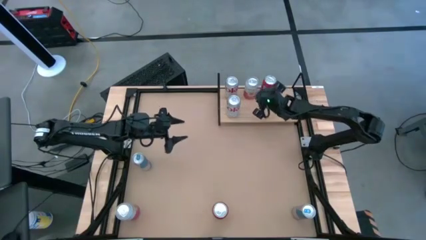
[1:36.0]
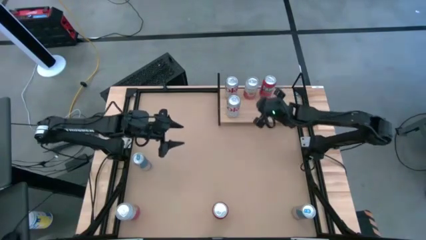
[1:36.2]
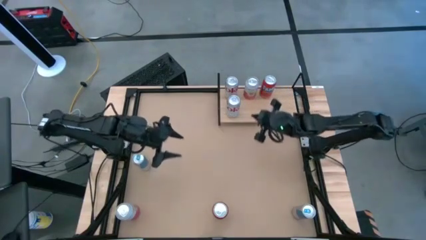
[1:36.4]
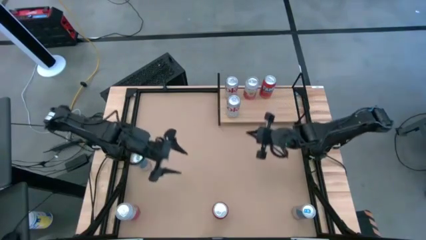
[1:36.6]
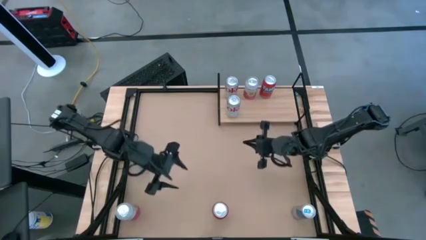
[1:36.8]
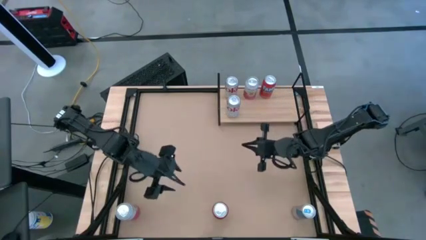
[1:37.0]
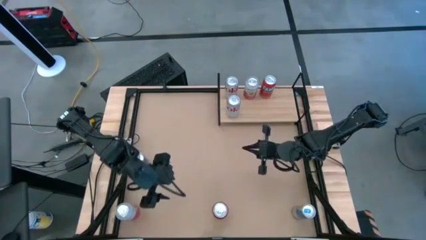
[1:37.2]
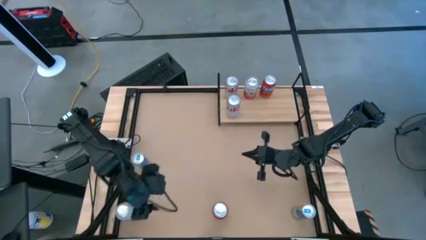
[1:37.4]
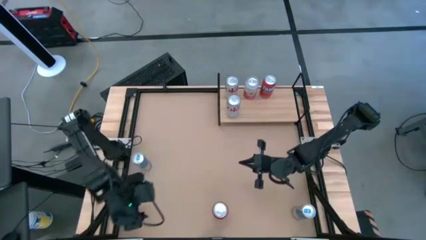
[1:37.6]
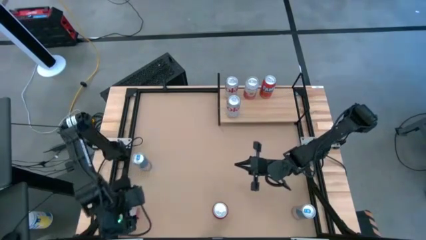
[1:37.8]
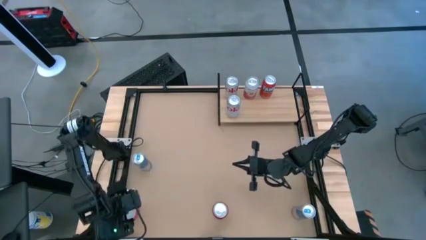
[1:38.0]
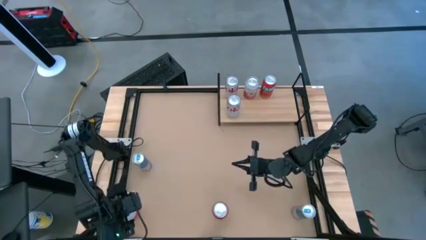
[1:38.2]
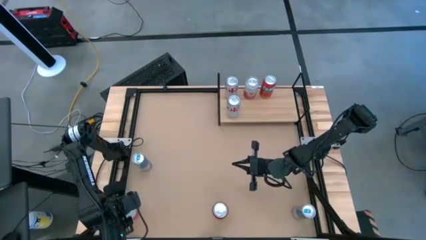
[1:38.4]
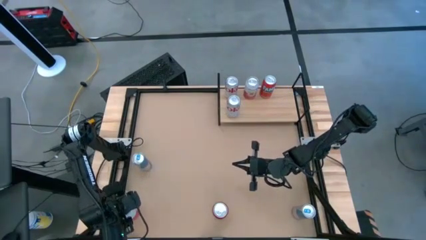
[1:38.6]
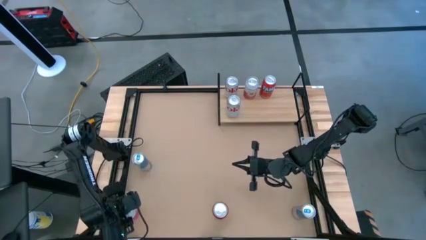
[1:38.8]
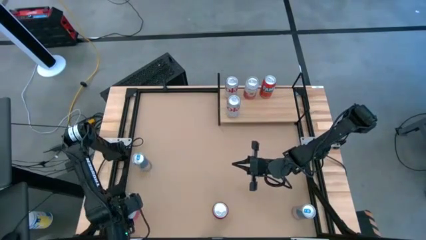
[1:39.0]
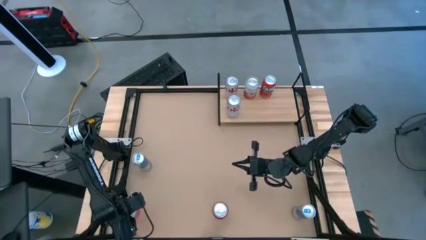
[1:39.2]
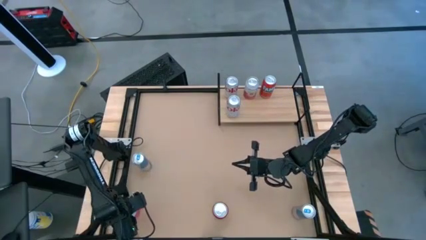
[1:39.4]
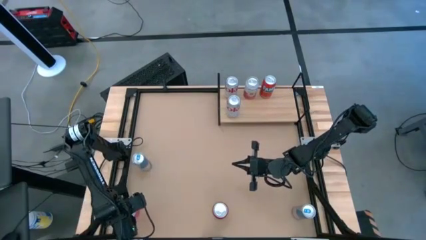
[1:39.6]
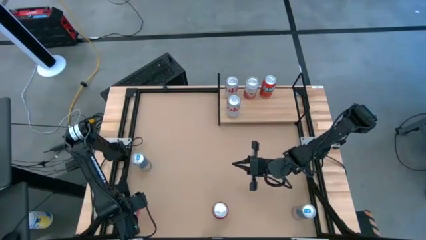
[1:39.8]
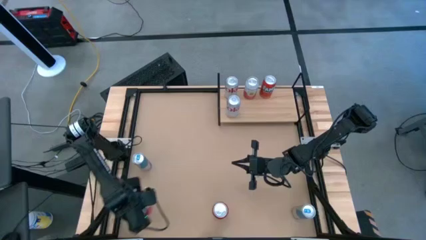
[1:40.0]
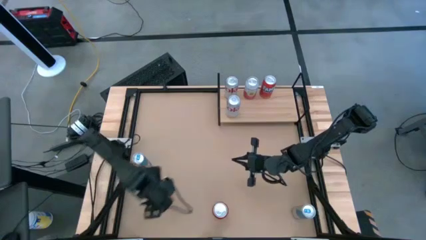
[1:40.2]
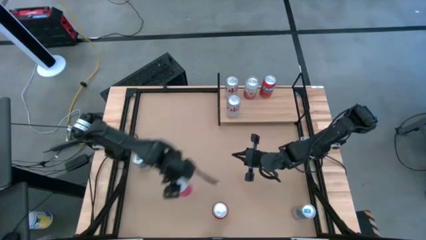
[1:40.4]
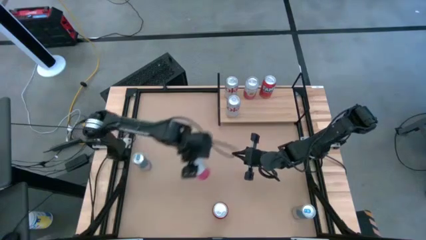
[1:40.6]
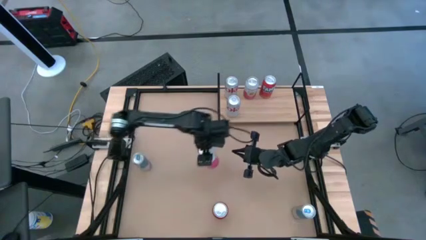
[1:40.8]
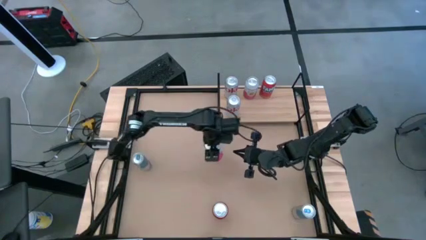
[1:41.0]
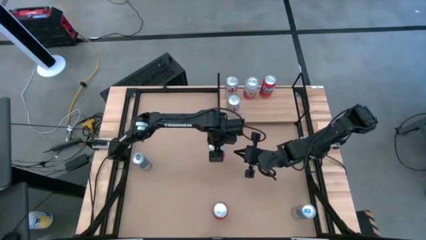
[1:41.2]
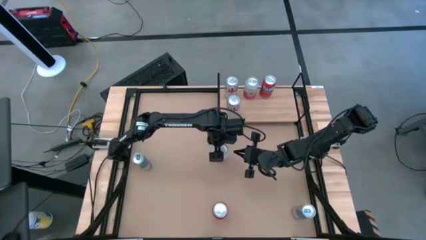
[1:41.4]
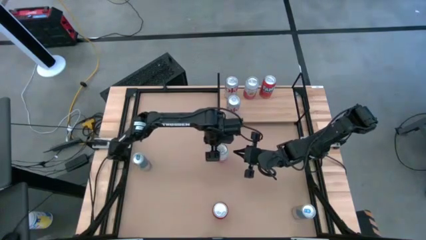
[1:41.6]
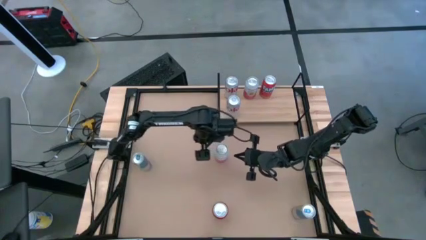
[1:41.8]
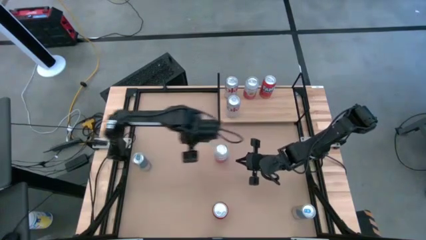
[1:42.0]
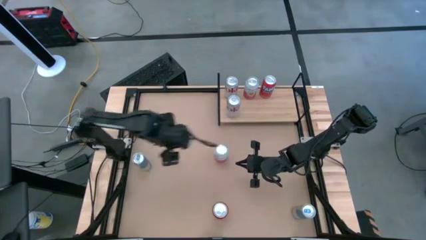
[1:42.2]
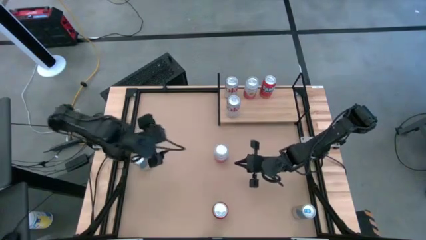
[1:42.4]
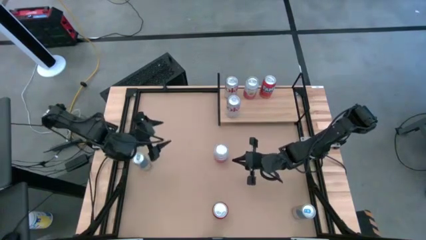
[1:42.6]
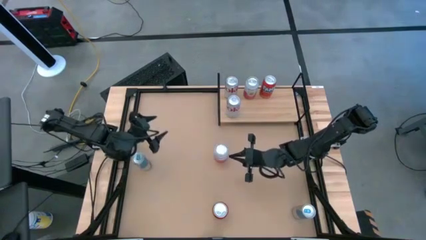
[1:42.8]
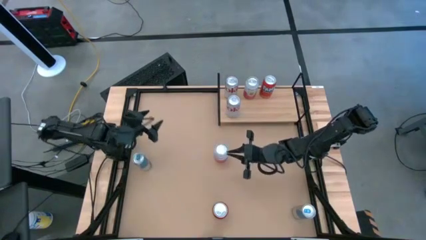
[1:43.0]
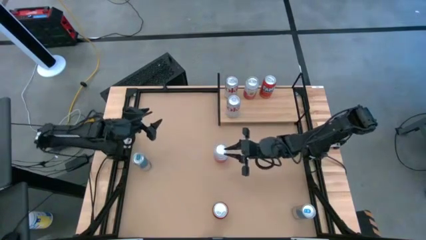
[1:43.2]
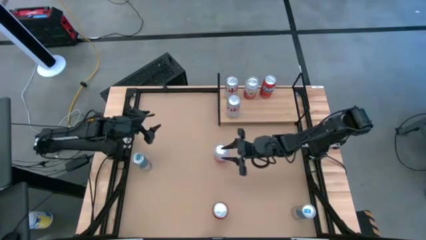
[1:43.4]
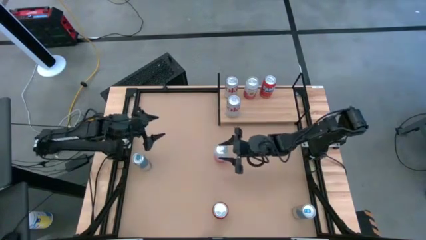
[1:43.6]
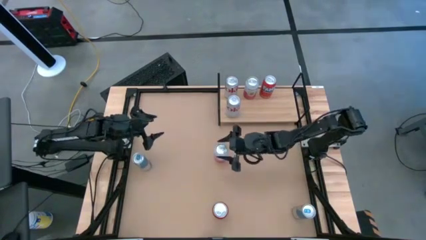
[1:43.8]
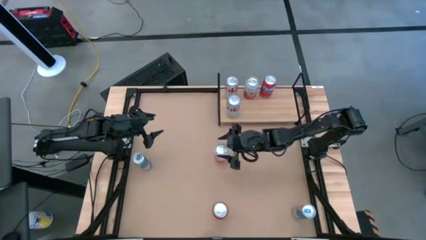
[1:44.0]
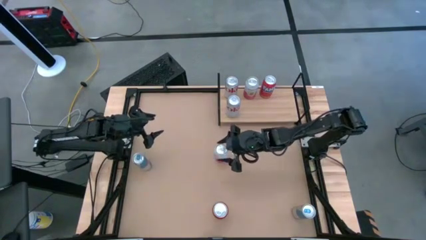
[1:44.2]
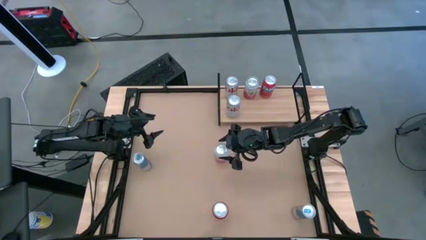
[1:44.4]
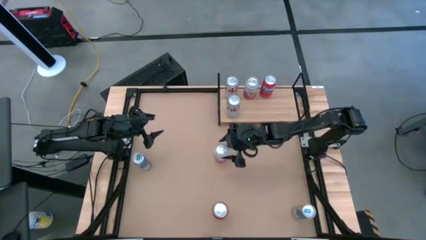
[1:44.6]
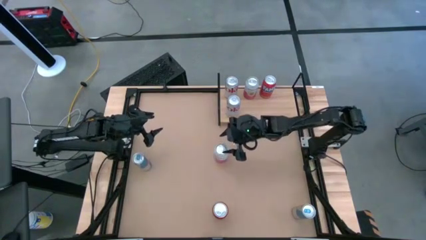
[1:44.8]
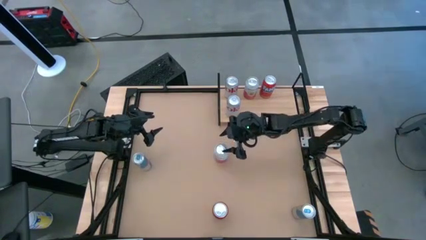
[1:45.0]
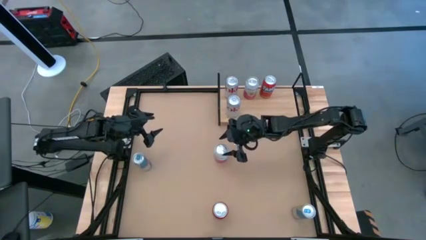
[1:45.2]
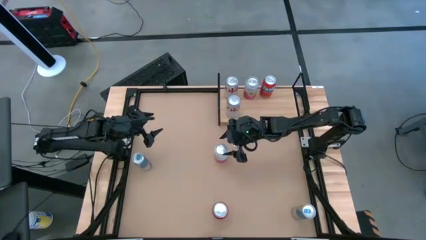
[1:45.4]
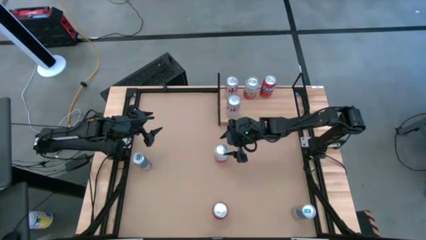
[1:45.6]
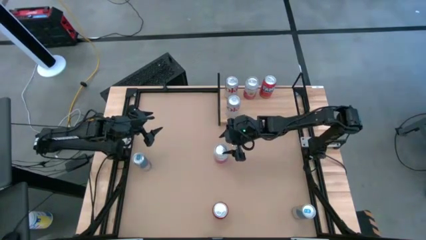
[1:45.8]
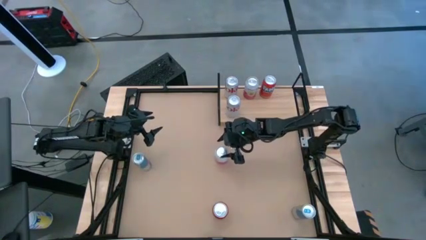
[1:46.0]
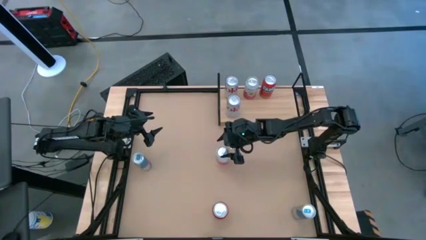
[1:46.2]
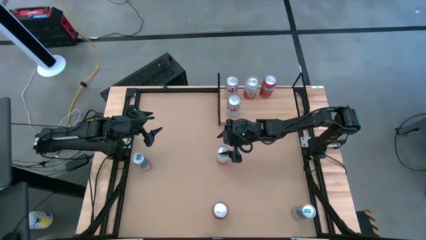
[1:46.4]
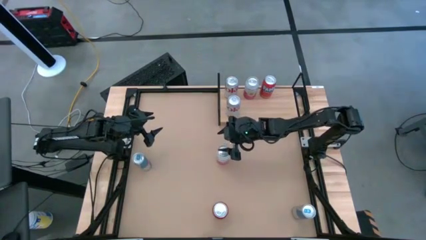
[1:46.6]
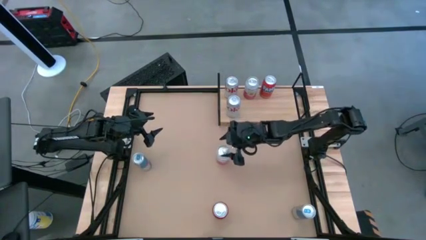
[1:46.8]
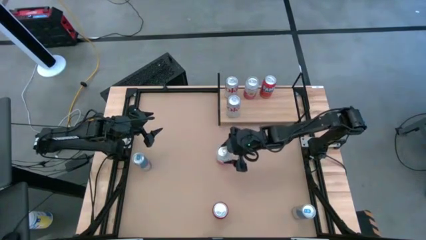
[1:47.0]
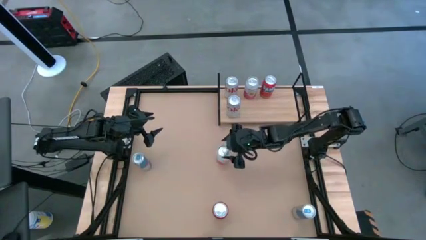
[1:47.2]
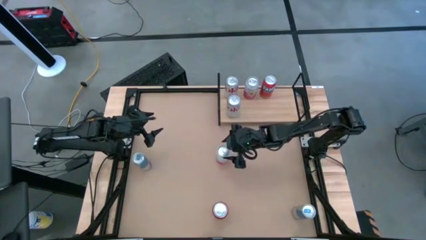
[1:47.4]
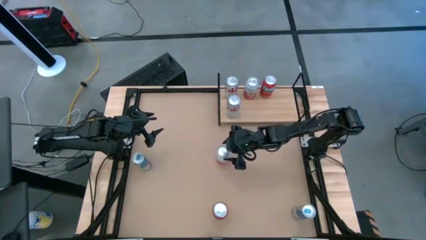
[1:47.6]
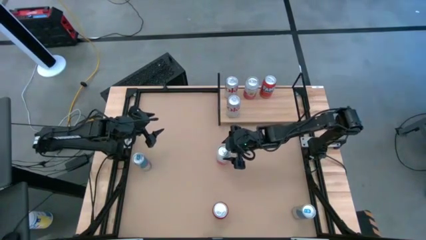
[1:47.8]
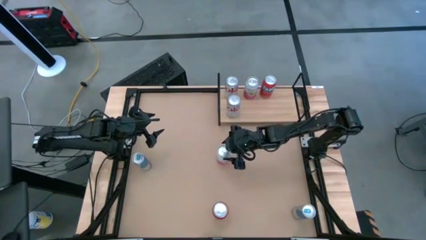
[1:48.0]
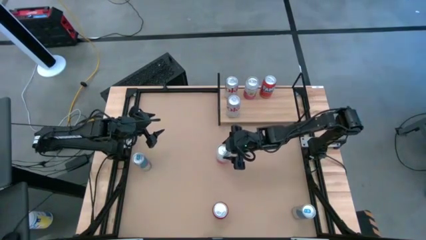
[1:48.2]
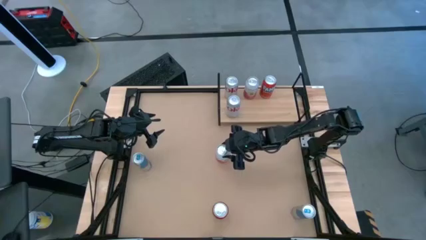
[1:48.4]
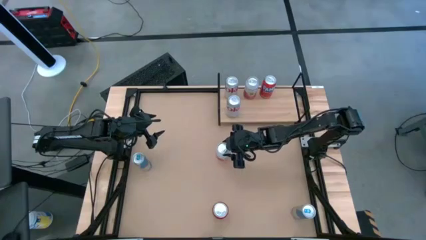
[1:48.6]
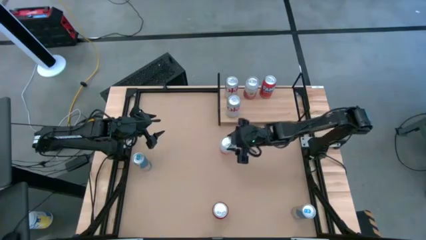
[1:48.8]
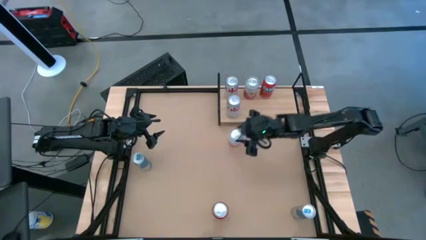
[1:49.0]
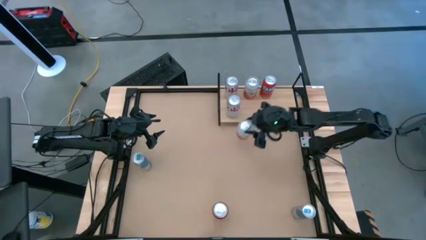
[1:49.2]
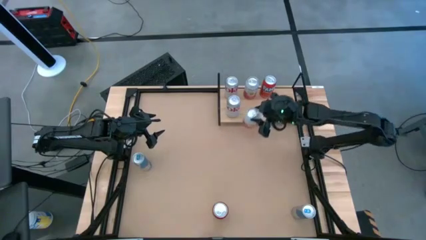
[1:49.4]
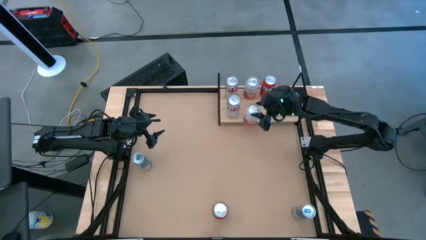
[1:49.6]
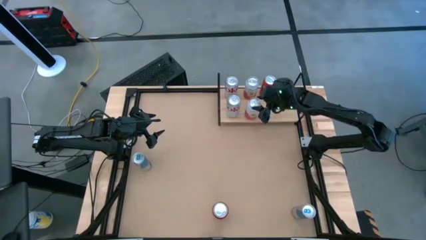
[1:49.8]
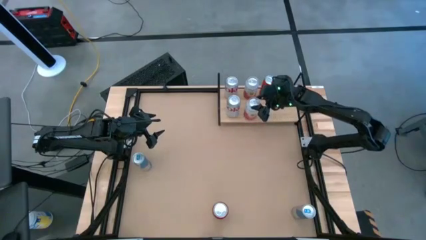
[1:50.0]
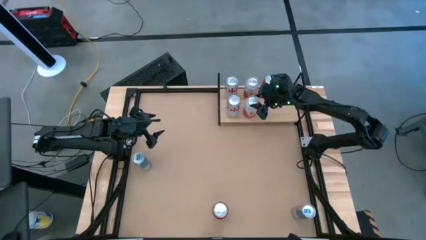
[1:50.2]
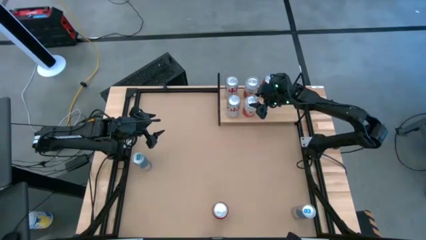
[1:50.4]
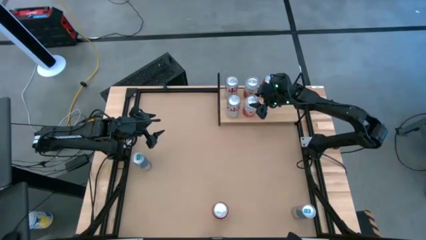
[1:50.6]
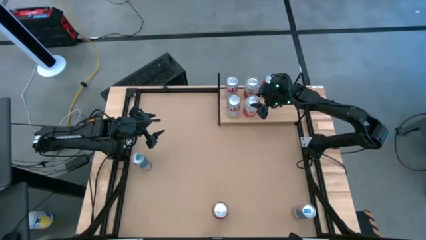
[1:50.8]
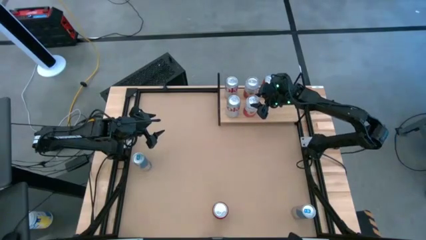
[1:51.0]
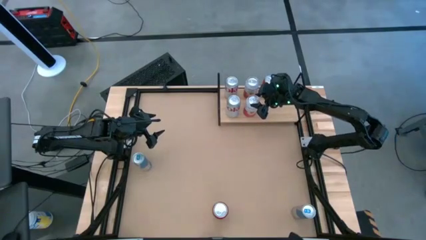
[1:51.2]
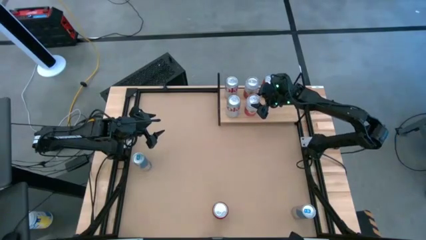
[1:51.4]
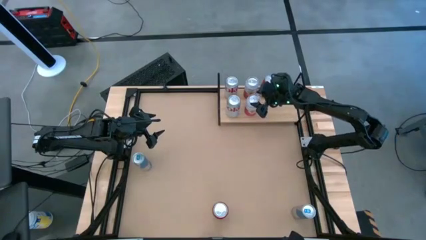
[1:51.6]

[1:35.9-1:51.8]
Task: Place canned beverage on shelf
Put the pink-white soda can on the shelf
